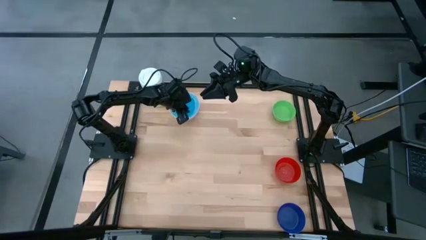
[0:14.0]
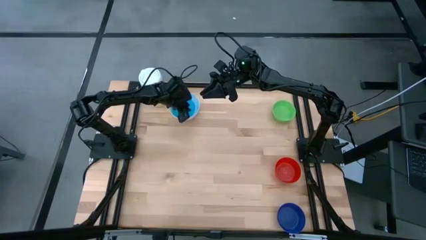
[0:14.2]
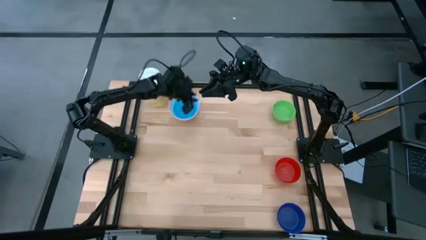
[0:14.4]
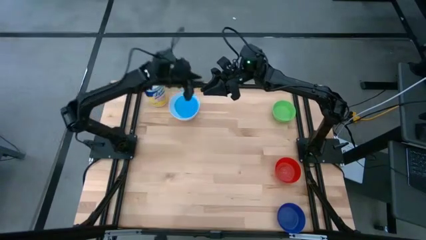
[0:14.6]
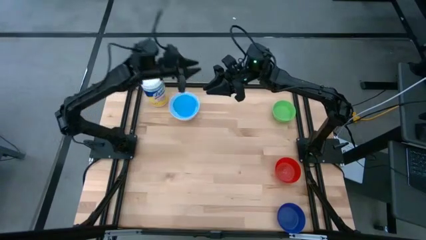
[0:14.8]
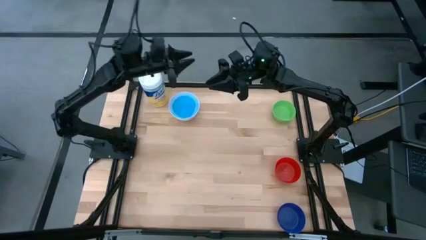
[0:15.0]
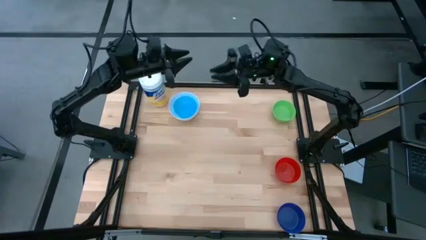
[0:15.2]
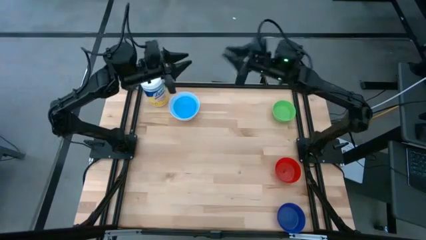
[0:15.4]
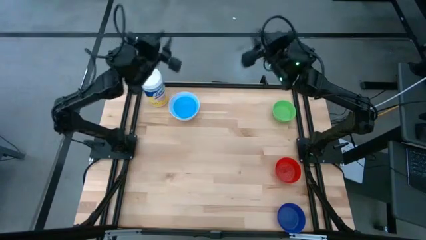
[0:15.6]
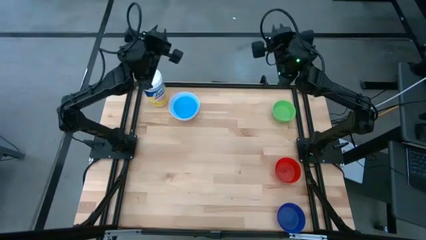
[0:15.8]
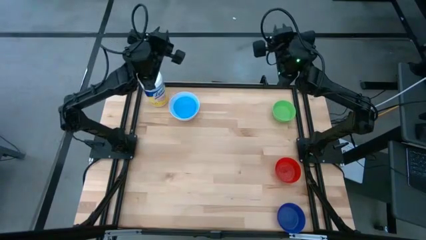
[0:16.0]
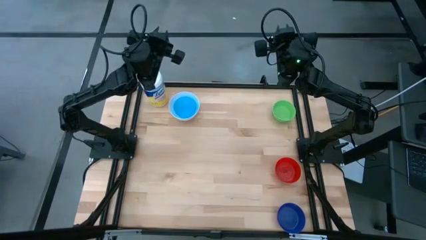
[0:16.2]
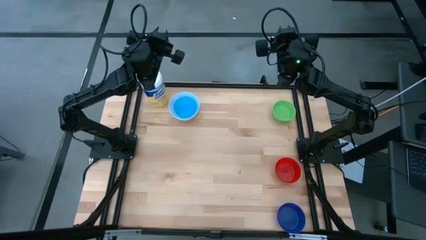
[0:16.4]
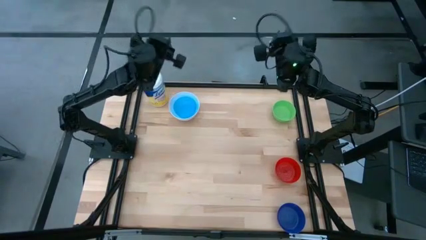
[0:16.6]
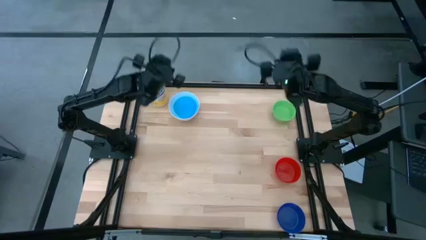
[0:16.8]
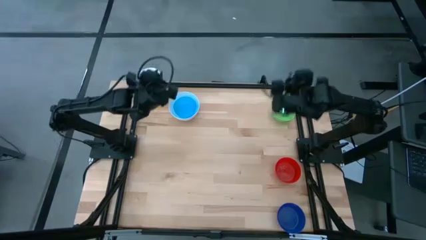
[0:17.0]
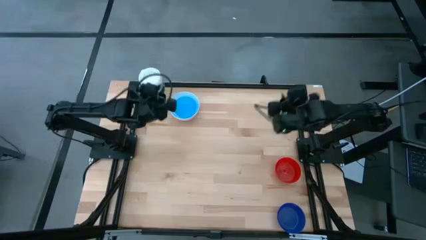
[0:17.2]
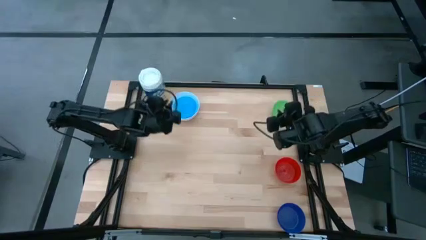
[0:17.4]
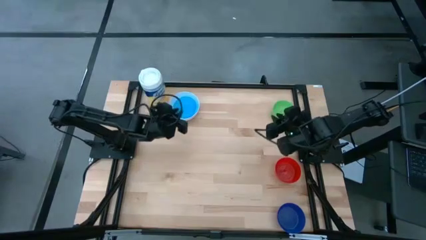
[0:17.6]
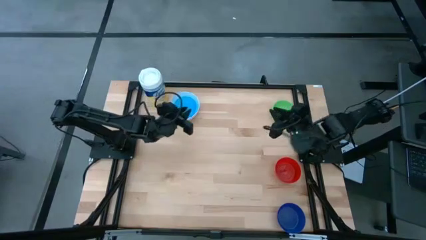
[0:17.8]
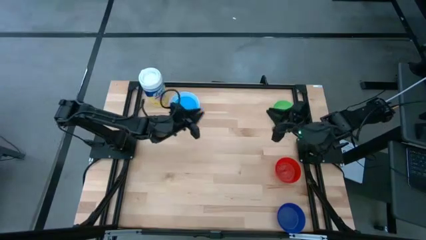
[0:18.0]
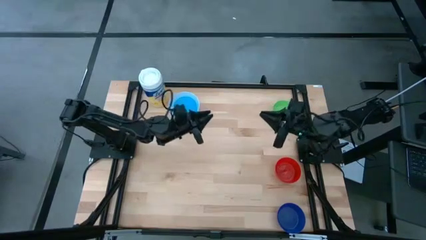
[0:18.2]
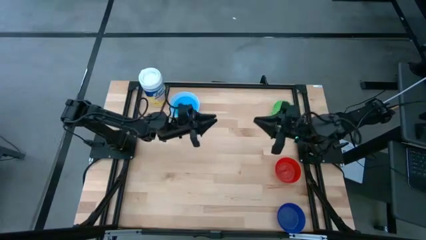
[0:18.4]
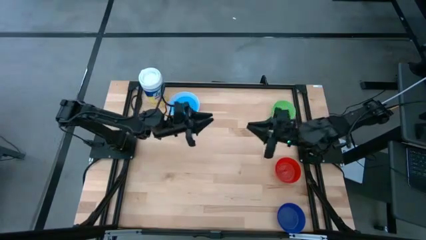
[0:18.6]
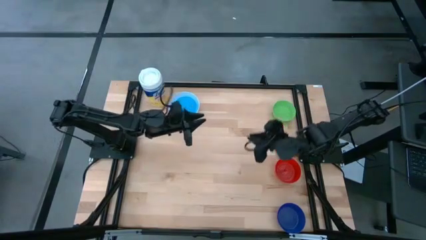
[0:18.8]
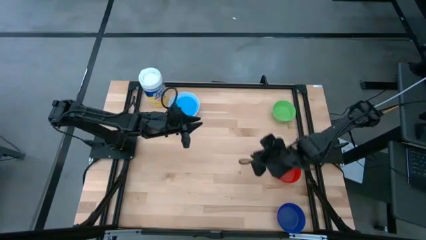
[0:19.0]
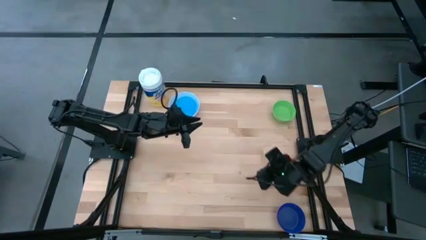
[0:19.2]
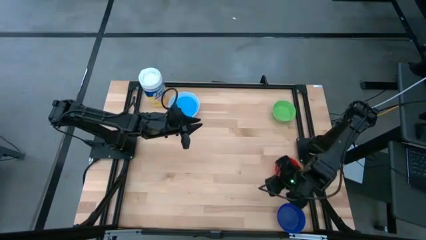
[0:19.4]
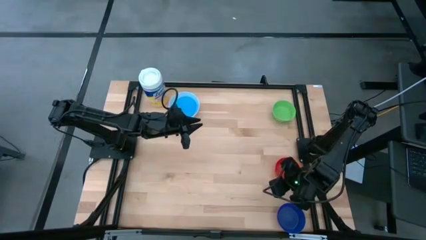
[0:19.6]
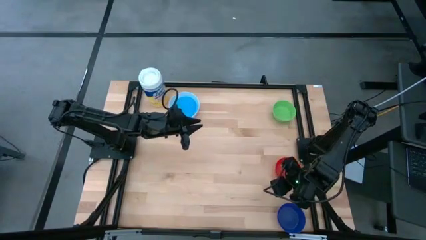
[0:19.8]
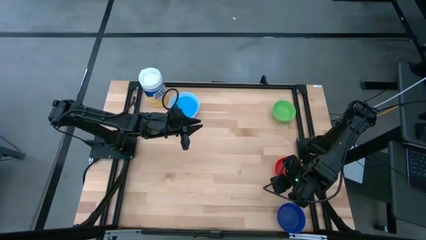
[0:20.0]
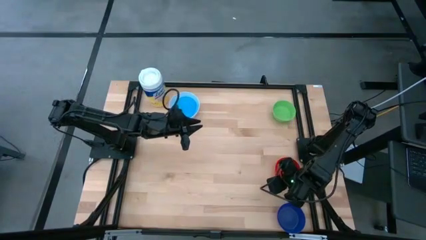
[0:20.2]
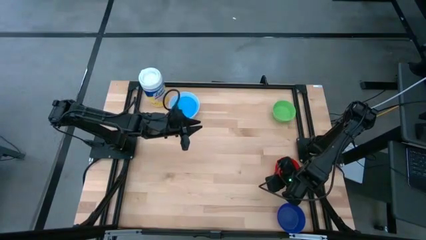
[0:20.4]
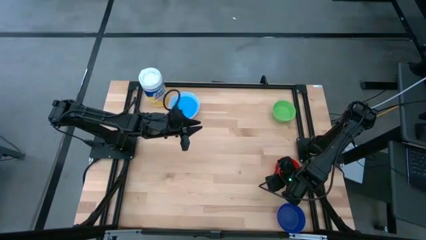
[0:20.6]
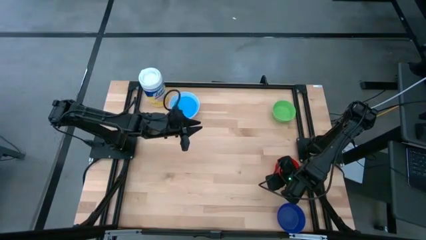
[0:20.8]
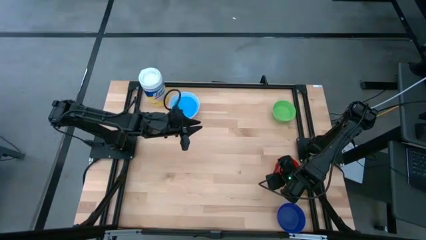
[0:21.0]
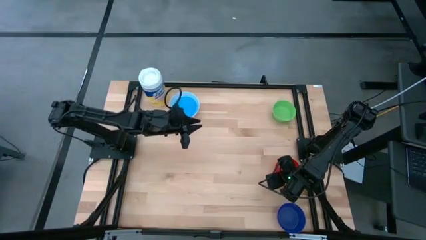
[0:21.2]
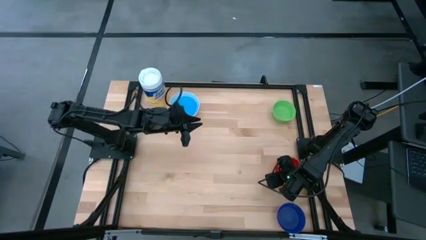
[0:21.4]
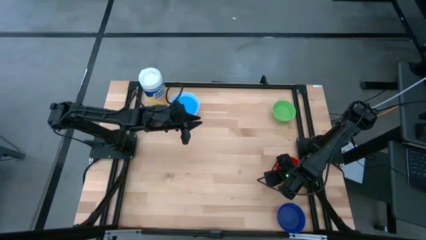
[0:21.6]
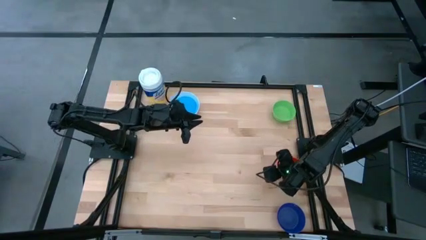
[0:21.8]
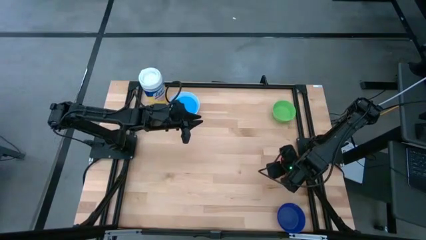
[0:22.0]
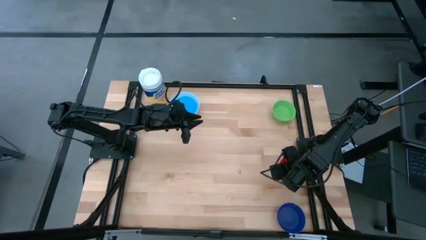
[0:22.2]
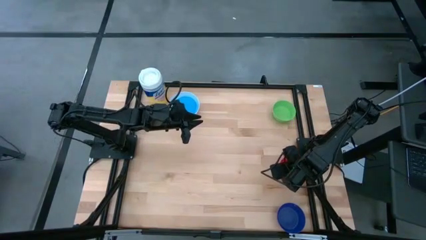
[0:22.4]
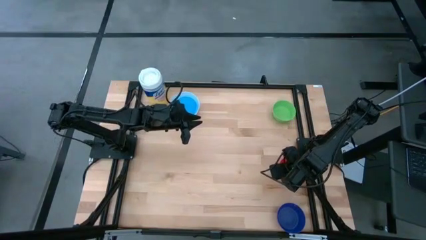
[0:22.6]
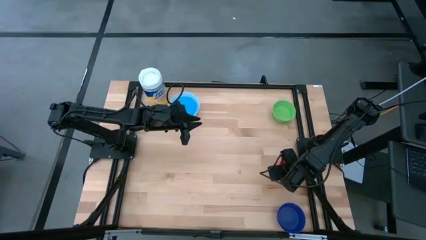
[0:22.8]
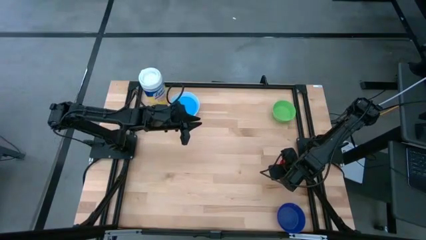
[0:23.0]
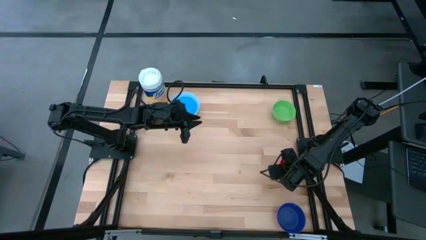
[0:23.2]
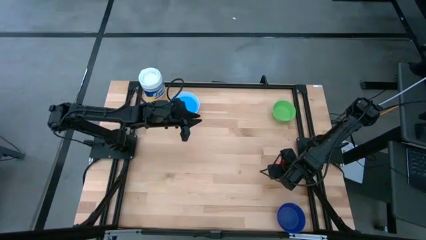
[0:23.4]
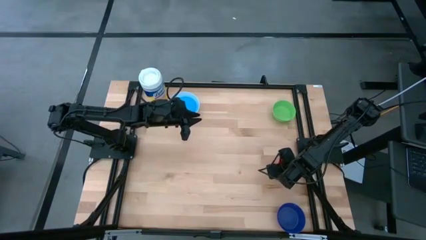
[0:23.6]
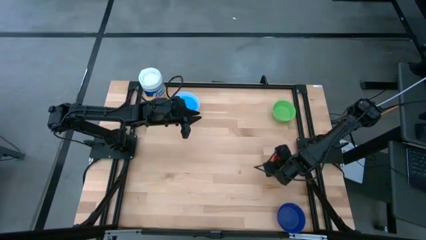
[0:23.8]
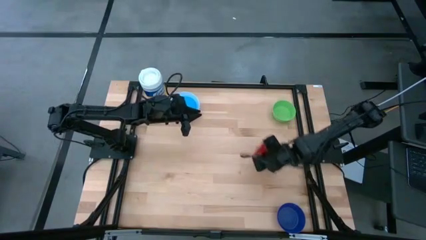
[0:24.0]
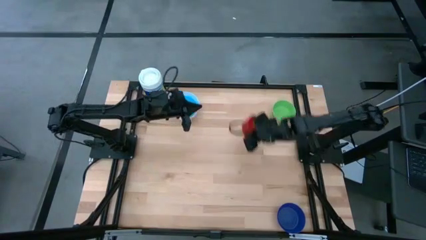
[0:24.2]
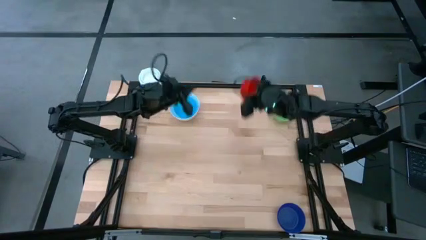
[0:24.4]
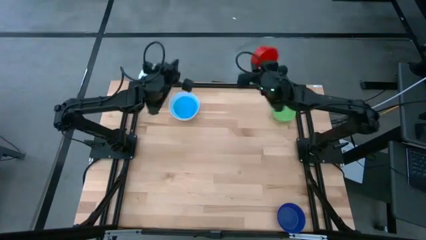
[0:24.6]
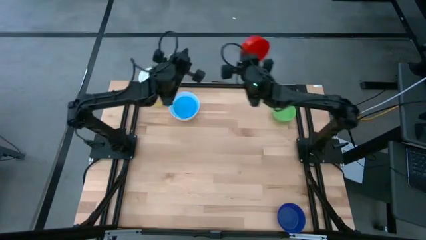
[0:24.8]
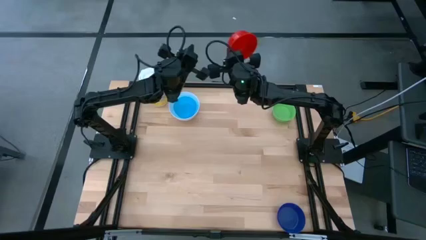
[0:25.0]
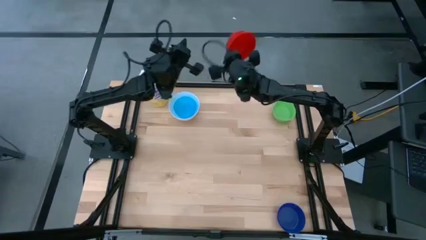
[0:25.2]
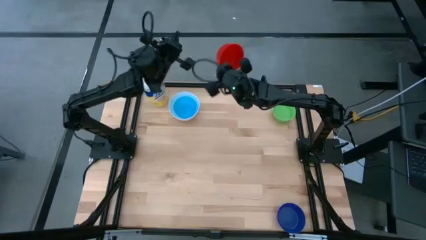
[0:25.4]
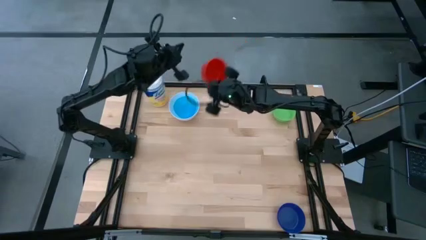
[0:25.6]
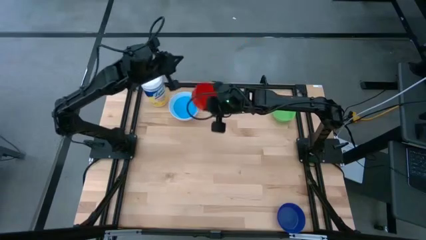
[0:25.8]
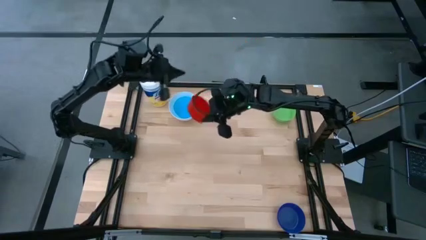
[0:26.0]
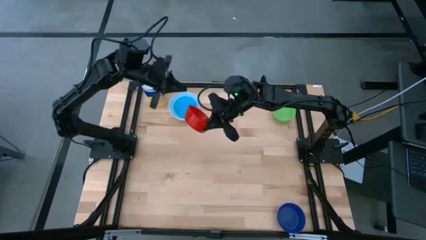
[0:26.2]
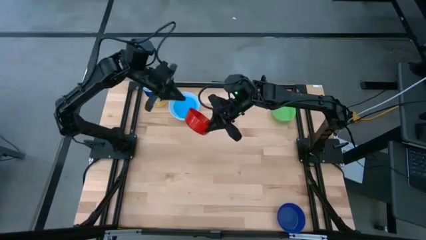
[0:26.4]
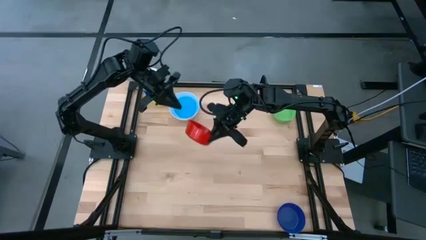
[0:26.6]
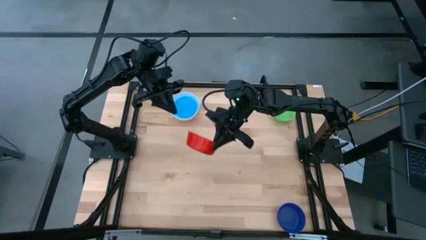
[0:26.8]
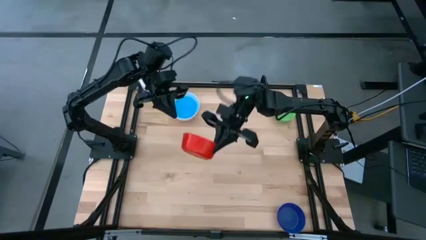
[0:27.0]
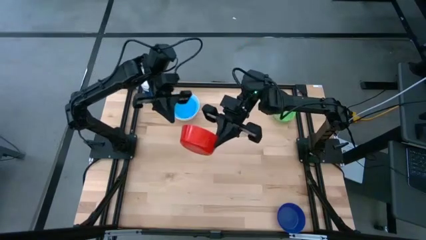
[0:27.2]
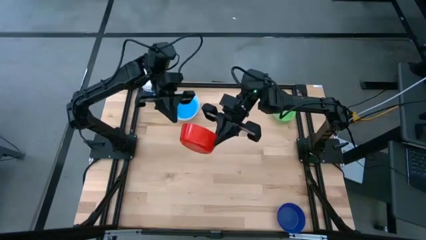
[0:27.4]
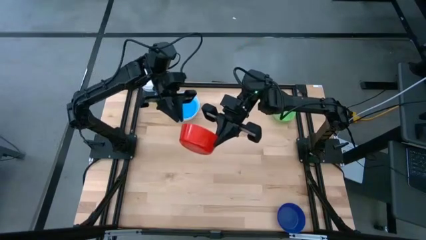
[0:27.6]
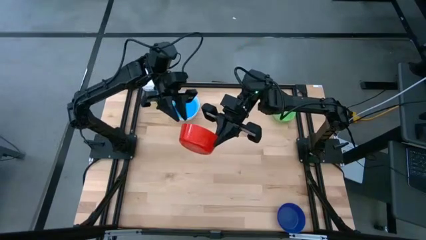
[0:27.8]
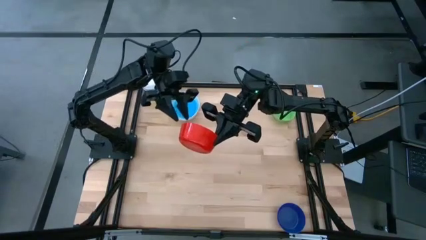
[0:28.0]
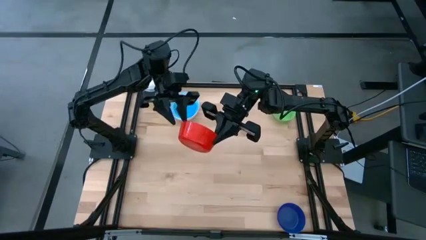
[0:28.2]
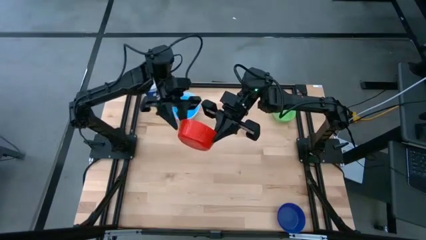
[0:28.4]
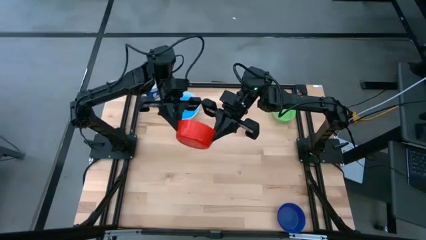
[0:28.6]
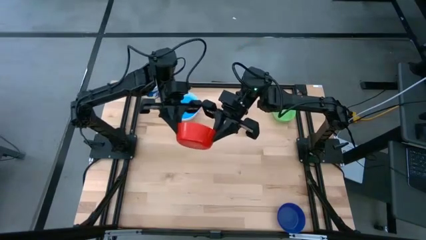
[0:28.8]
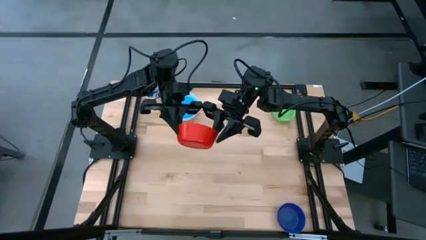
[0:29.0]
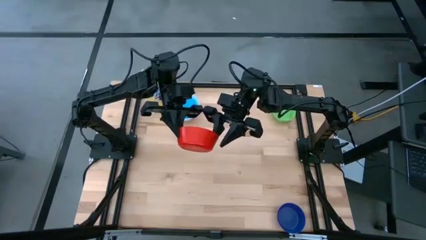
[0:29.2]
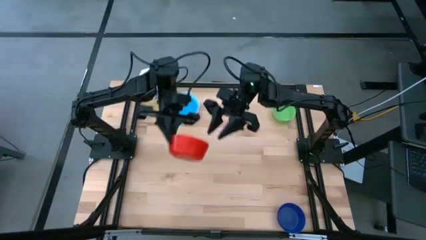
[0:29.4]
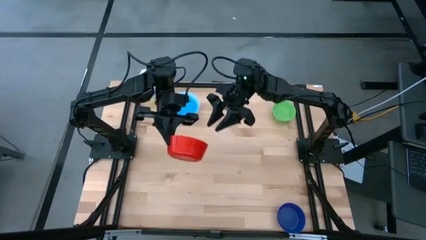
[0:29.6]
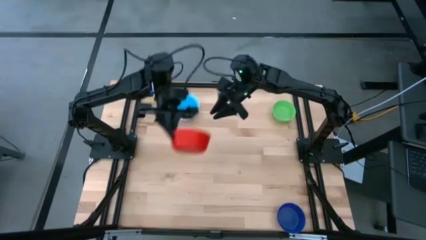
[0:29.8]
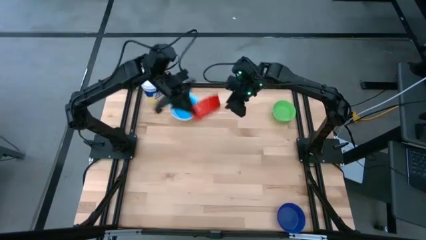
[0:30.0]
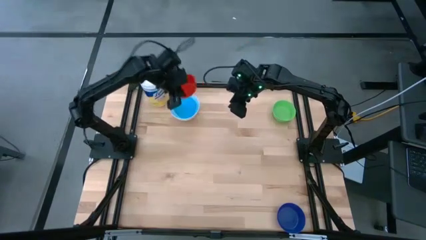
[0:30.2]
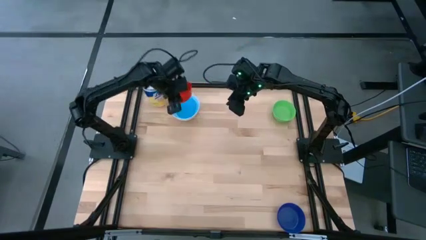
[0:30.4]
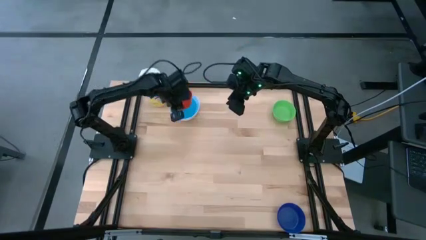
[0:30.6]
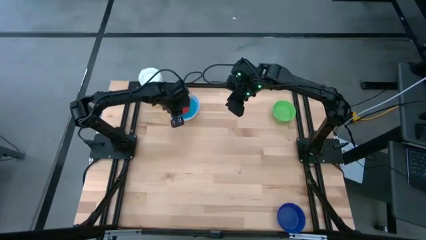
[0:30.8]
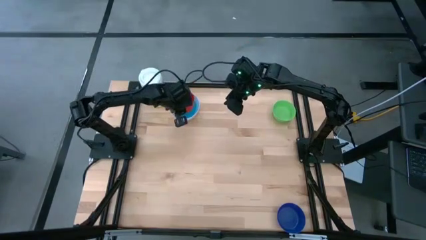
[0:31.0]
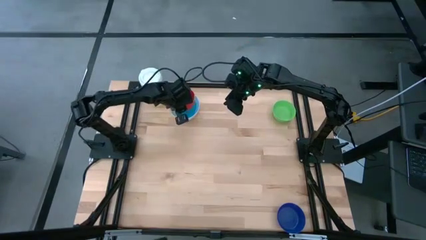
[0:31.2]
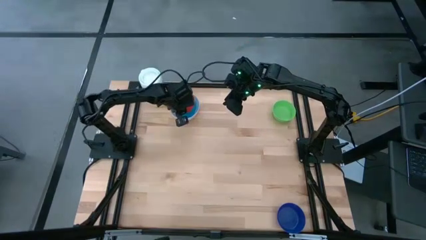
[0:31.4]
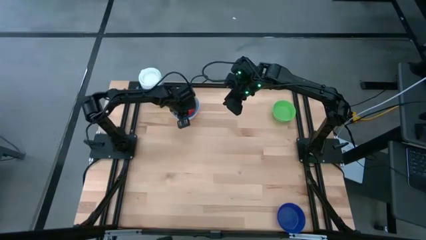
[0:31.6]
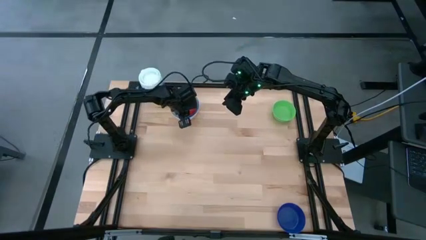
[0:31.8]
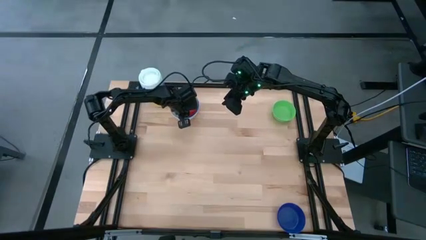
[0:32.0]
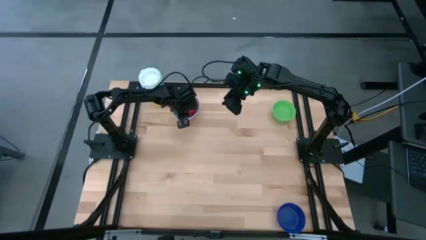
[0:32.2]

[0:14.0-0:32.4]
Stack the red bowl on top of the light blue bowl
